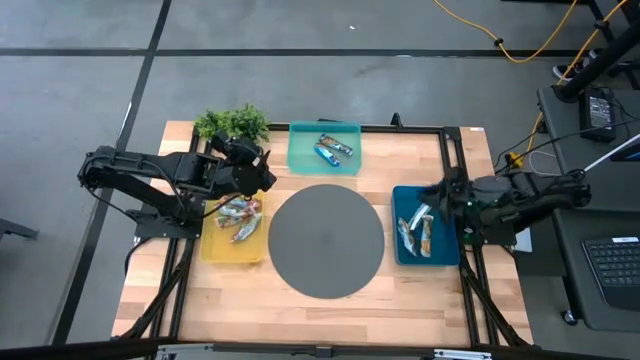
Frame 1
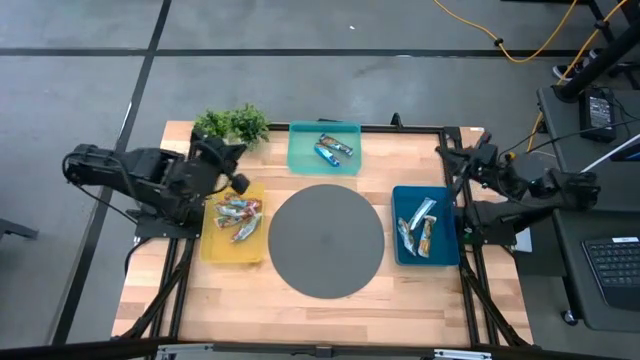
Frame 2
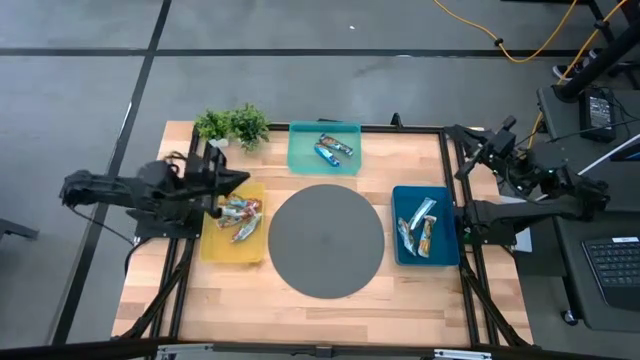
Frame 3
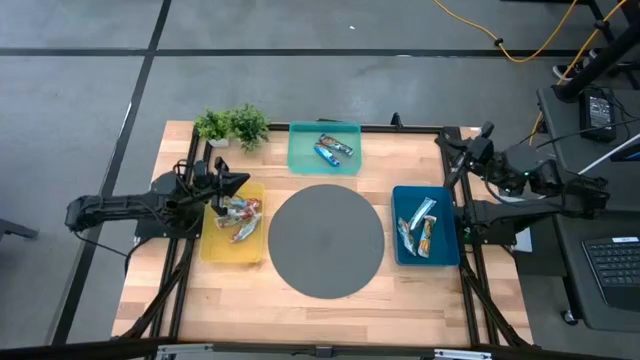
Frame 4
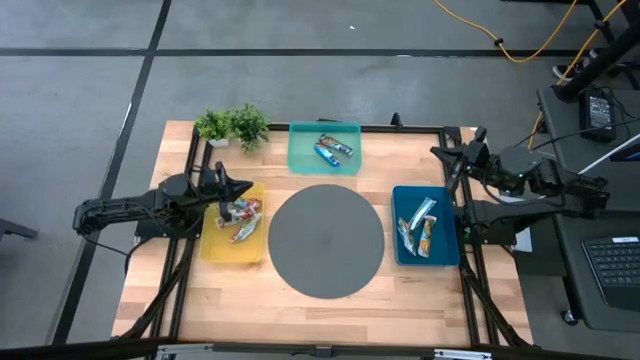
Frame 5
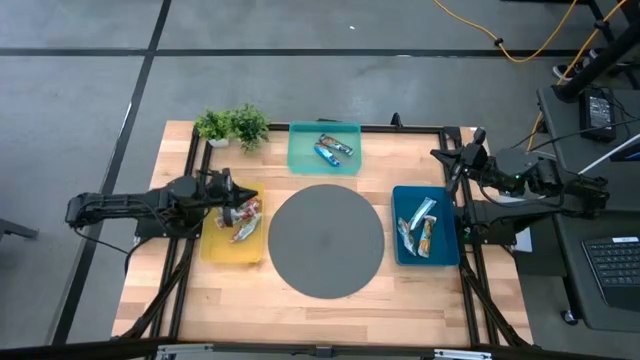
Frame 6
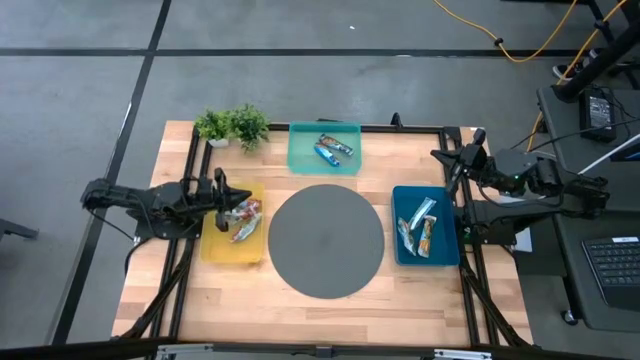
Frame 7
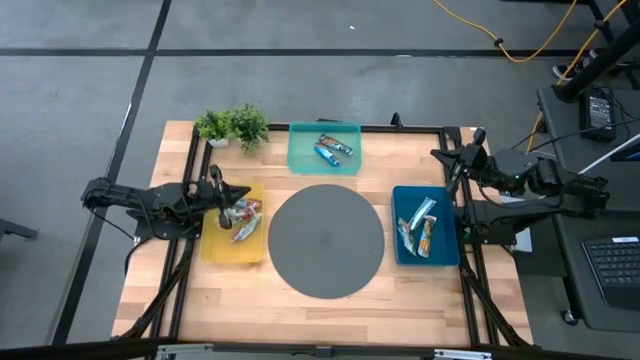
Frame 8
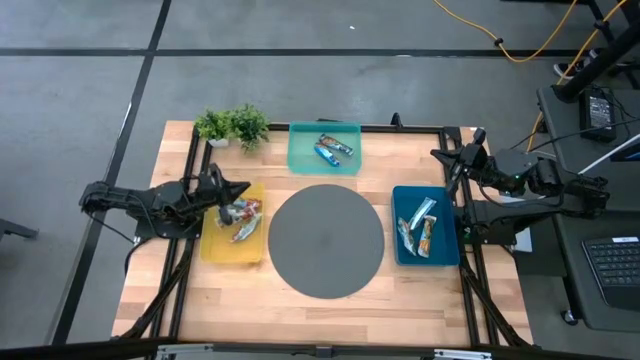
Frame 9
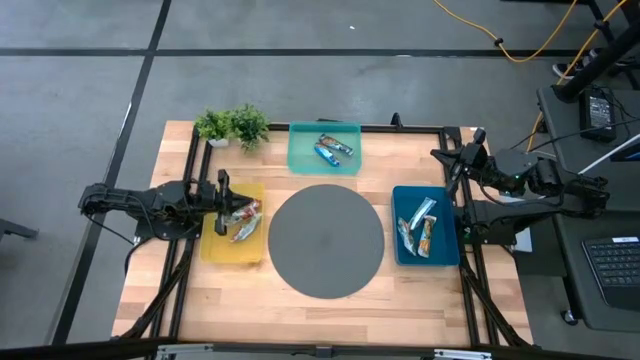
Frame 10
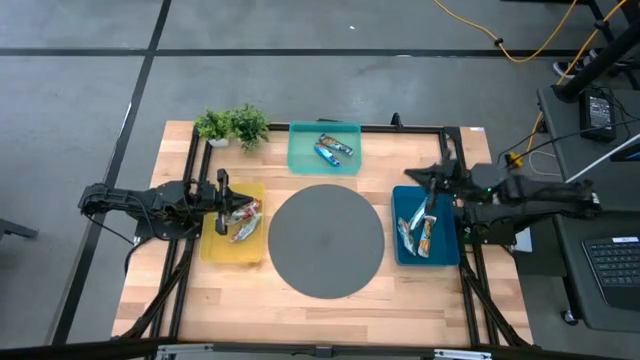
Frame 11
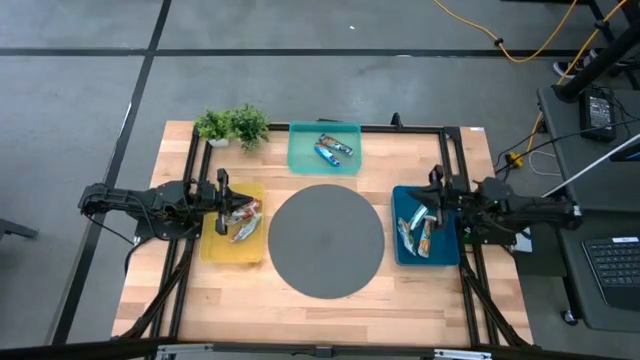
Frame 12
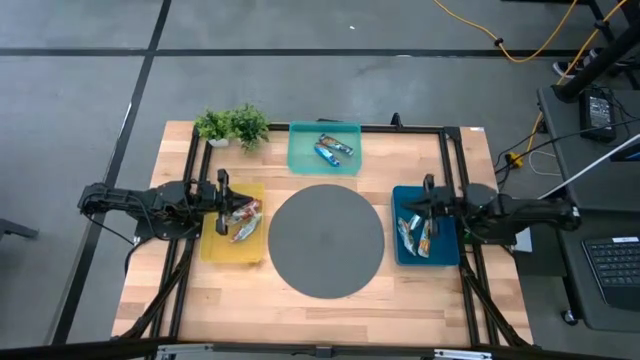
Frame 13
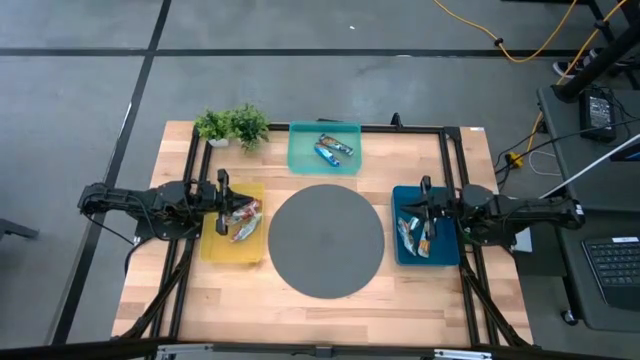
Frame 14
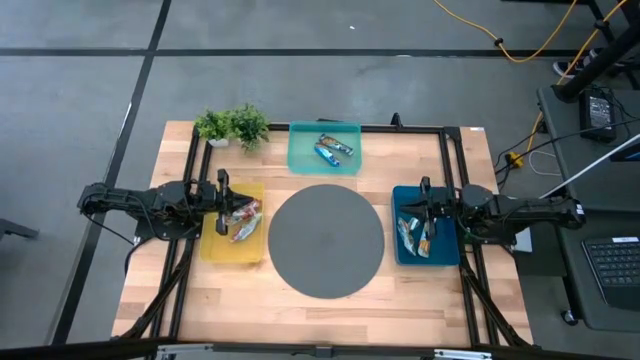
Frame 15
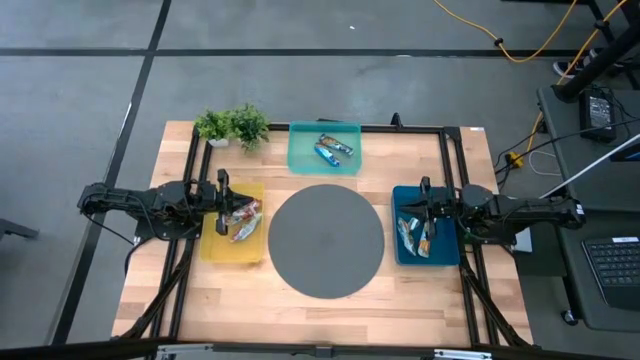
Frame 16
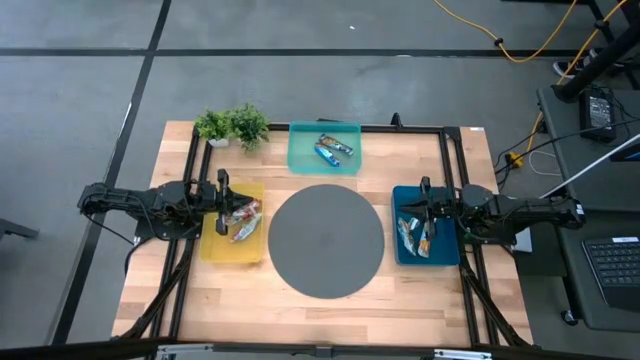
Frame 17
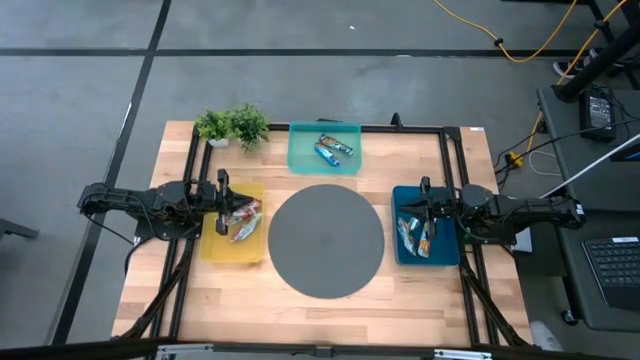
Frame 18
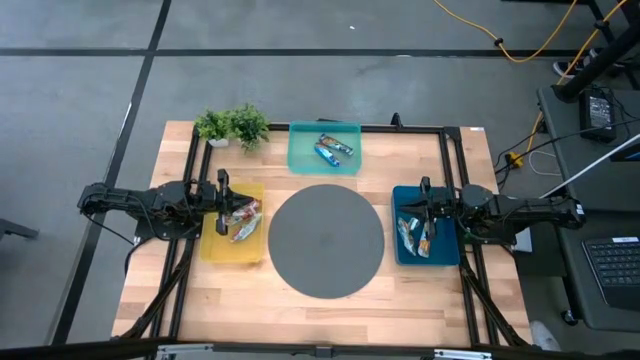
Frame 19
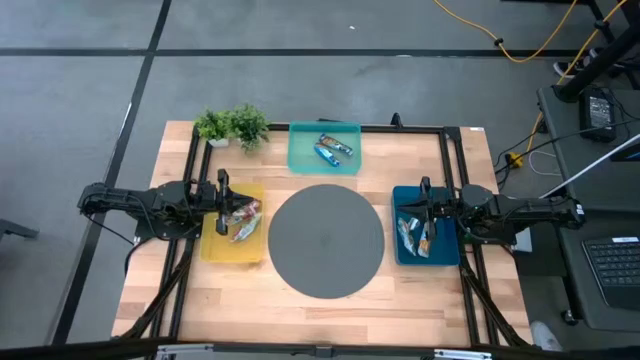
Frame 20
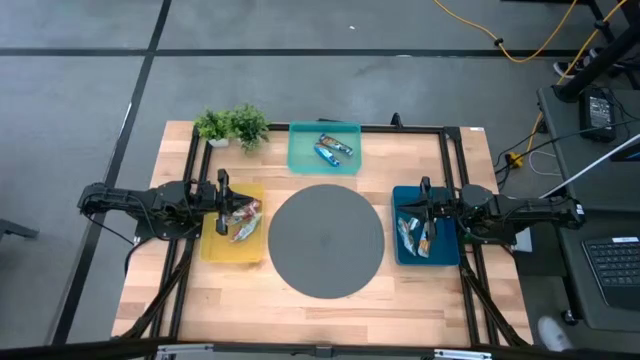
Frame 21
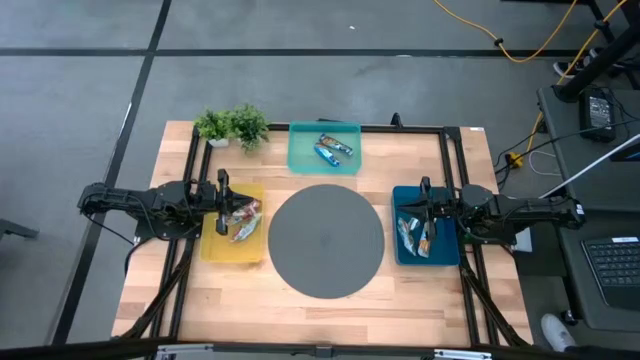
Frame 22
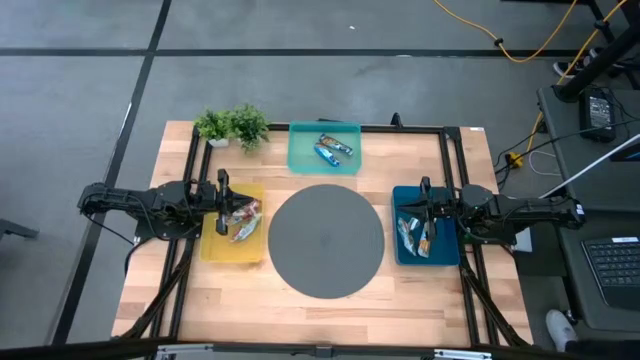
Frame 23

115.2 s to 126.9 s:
Task: Pick and place Granola Bars by type
Return to Home Position

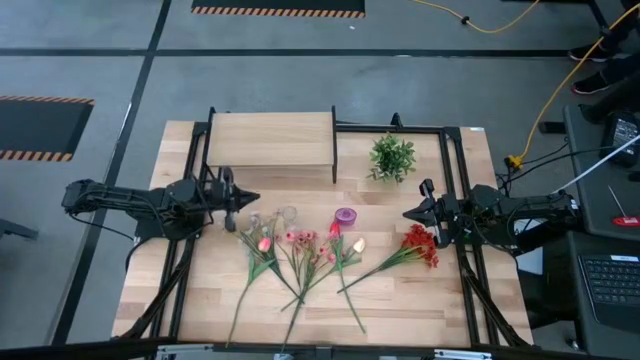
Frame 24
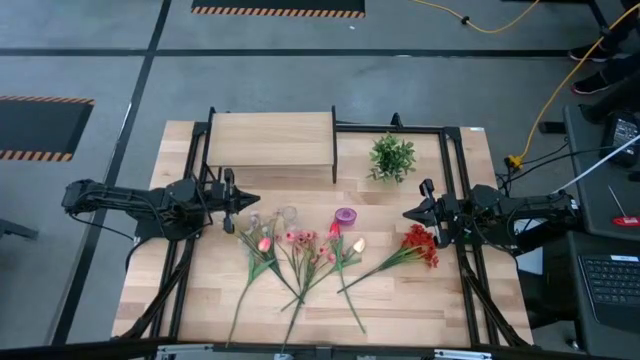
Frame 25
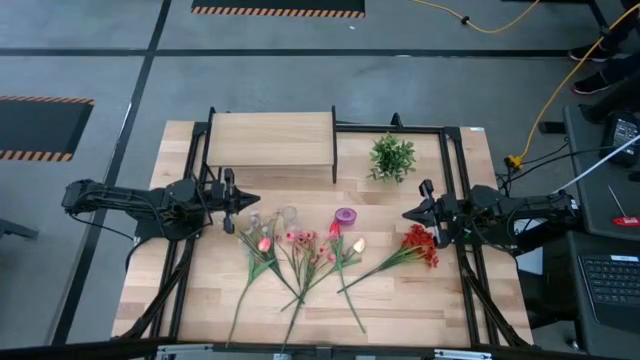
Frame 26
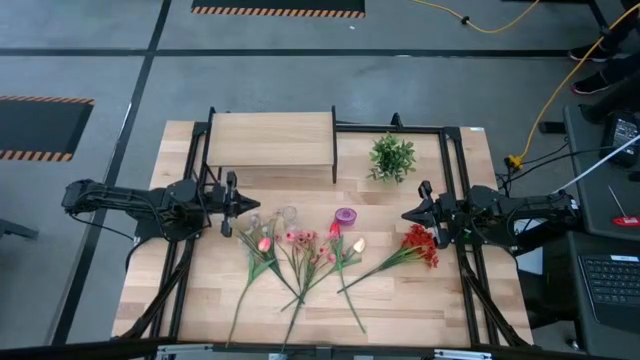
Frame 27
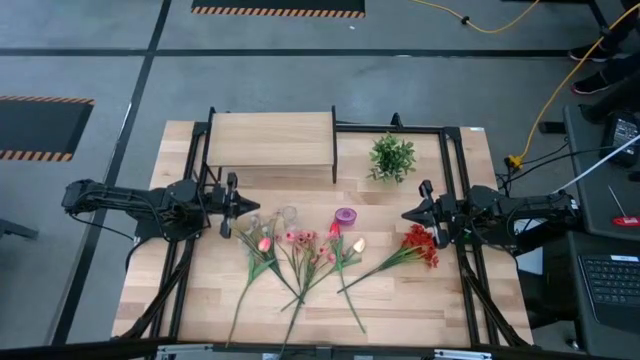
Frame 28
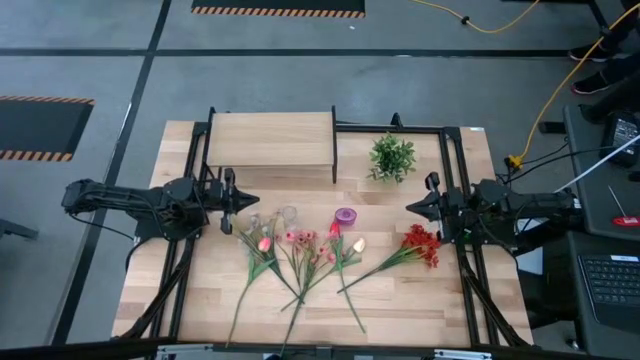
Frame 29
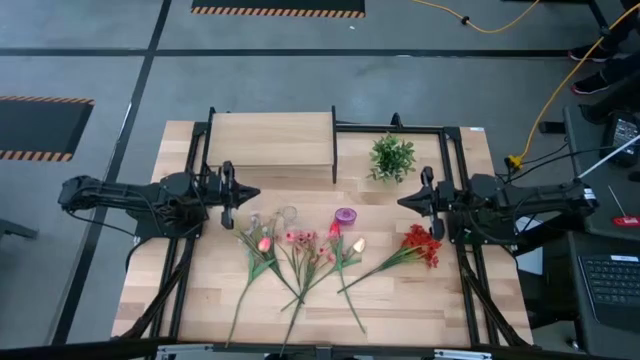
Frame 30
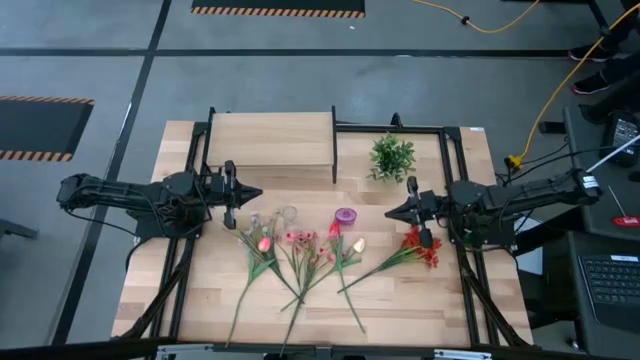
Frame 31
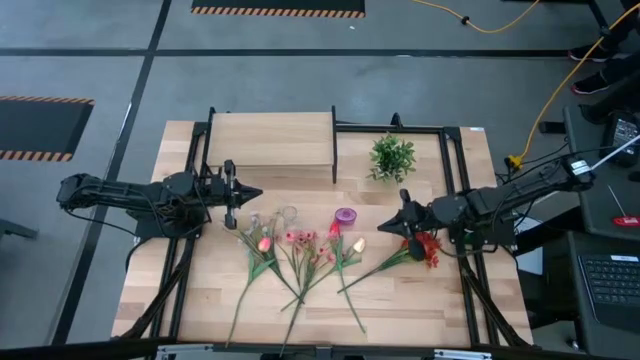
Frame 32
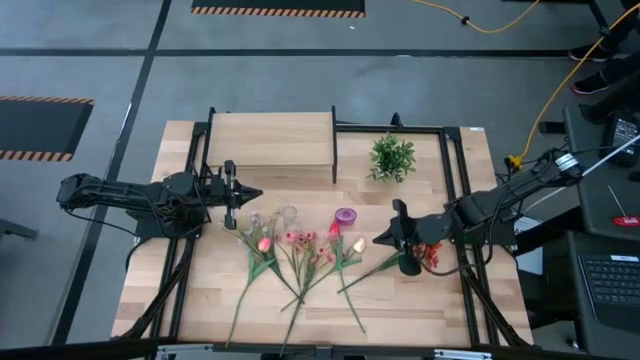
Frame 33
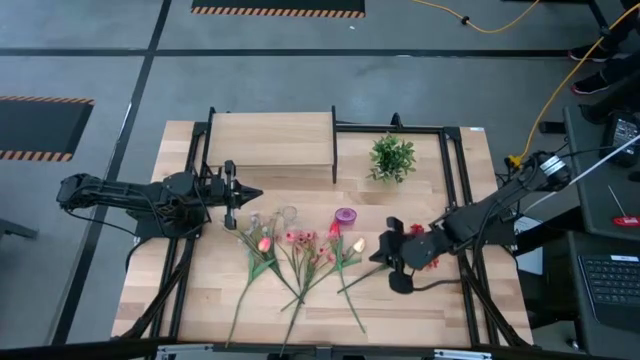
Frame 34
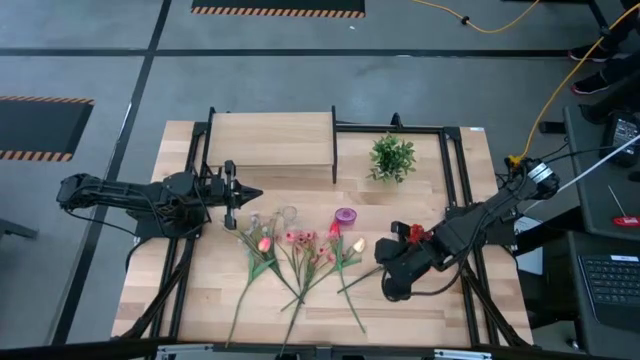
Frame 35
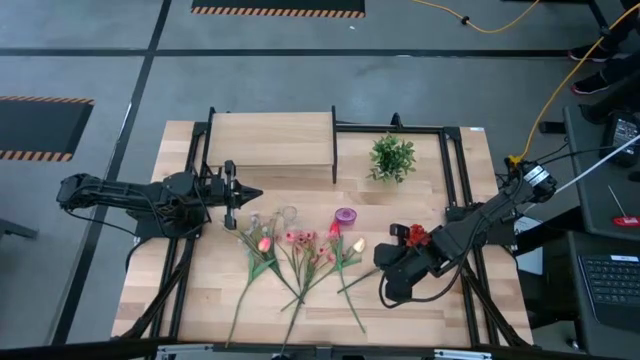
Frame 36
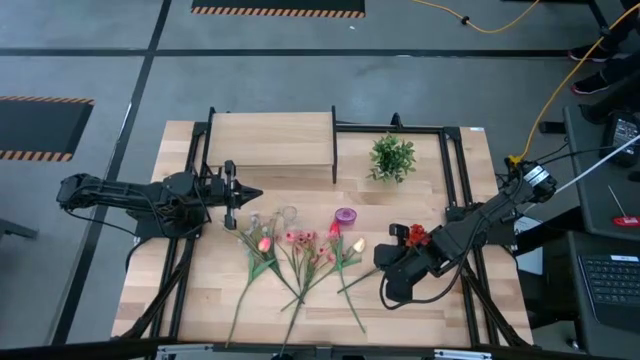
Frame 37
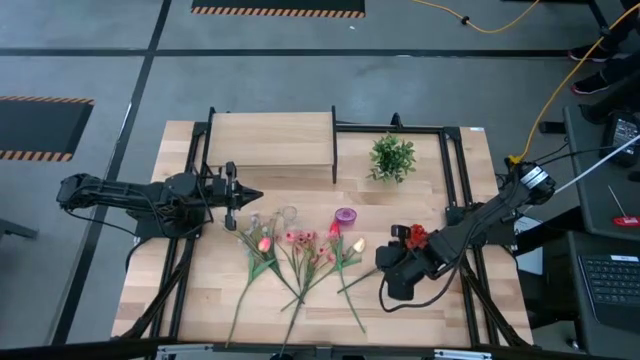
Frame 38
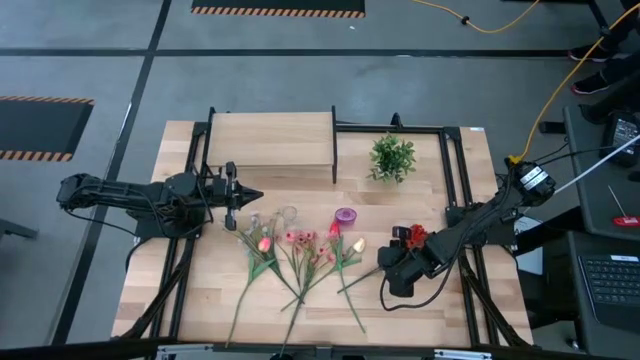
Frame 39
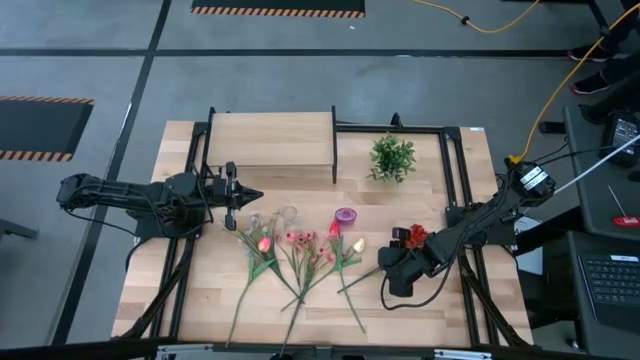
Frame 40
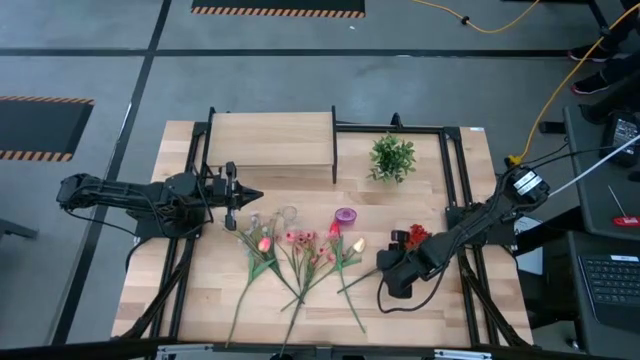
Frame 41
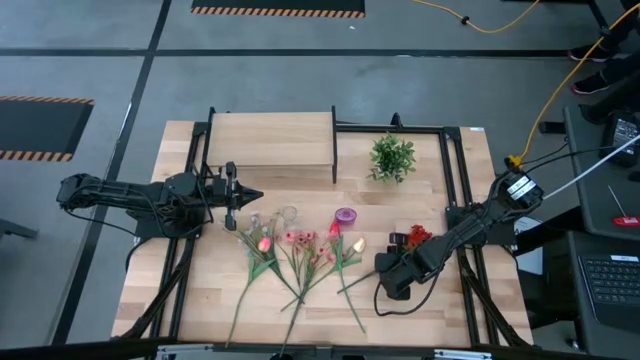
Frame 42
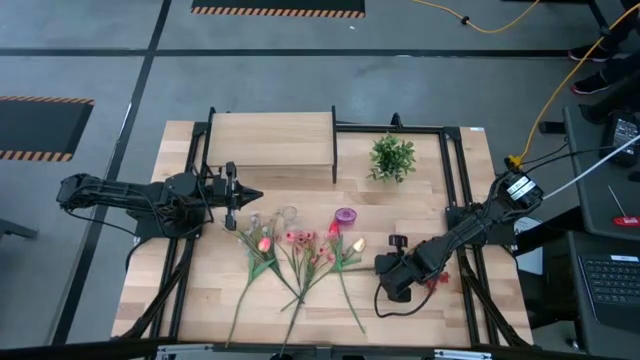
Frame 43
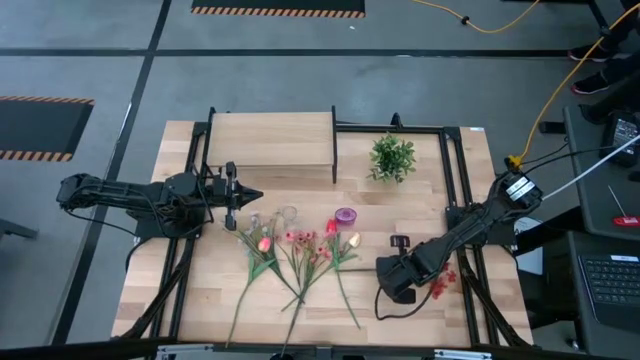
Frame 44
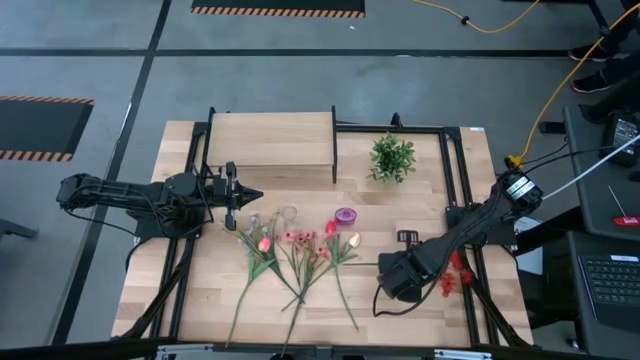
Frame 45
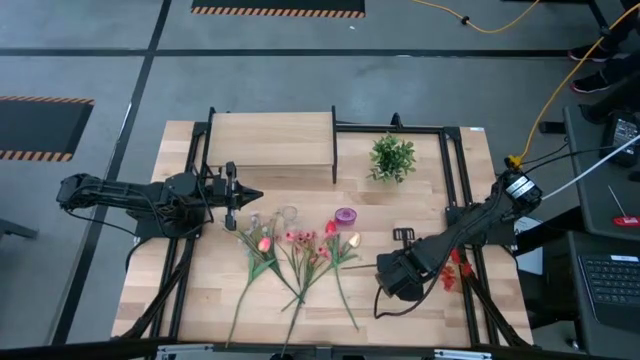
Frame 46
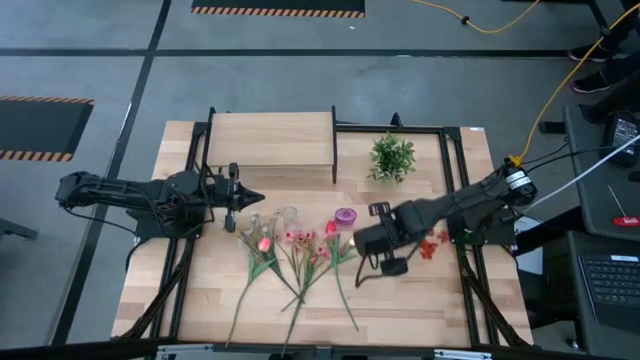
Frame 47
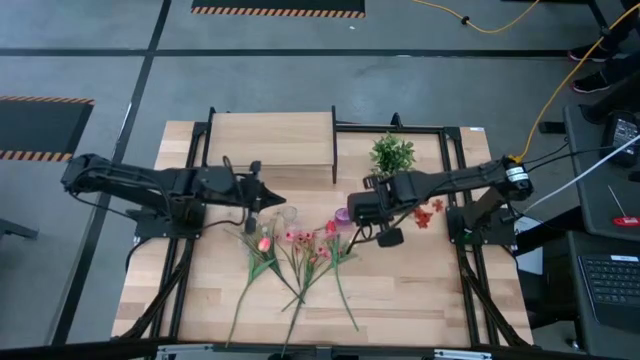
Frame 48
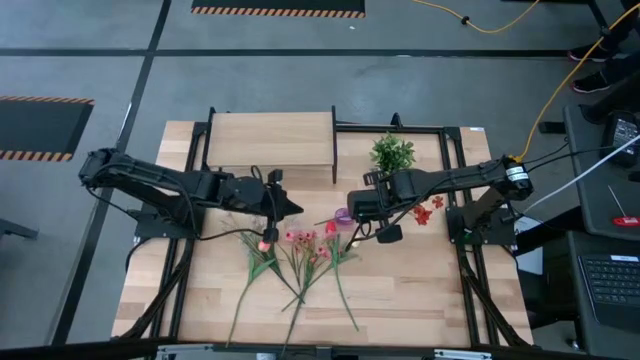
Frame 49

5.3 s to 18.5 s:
Task: Pick and place flowers into a vace then onto a shelf
Put the red flowers into the transparent vase
